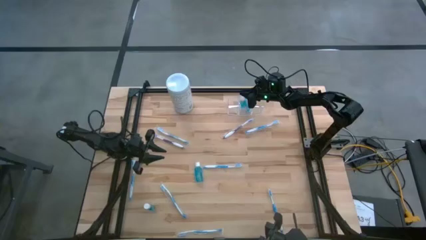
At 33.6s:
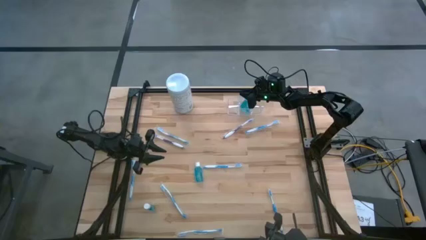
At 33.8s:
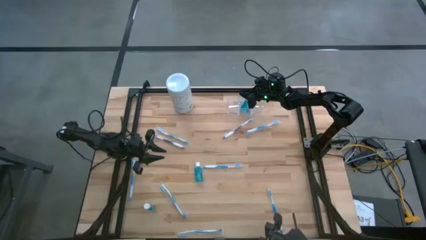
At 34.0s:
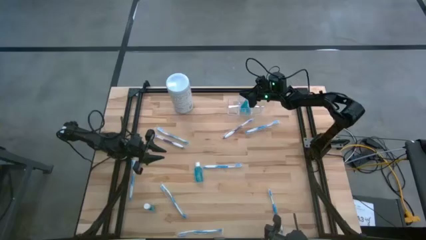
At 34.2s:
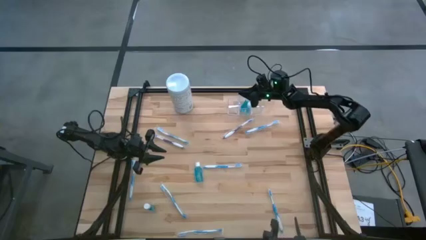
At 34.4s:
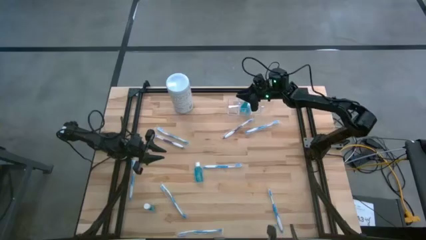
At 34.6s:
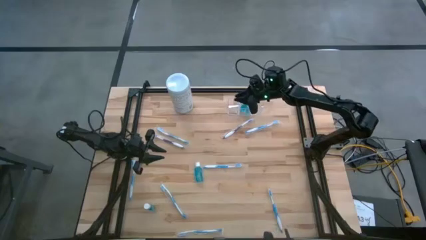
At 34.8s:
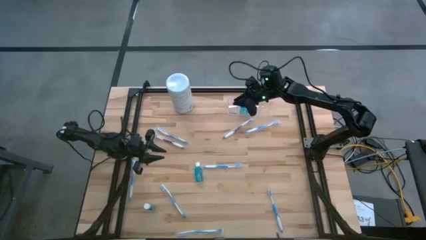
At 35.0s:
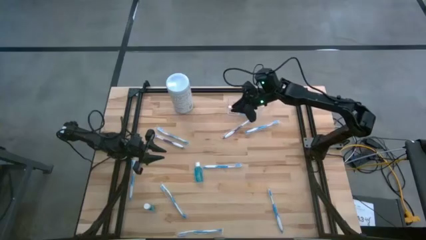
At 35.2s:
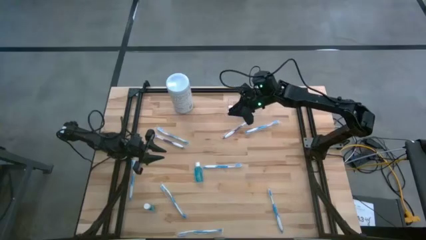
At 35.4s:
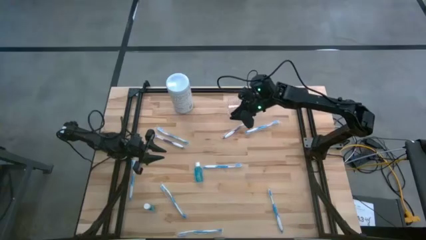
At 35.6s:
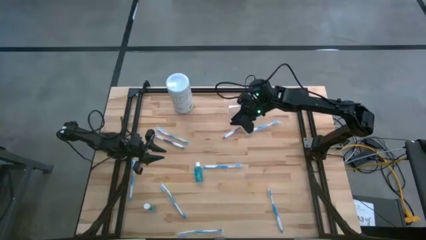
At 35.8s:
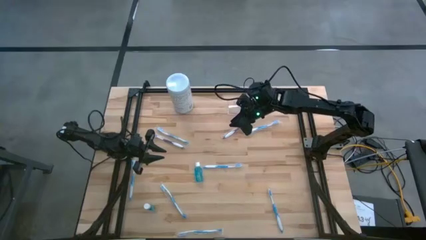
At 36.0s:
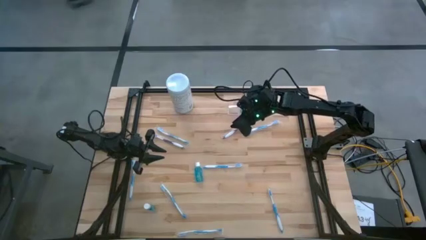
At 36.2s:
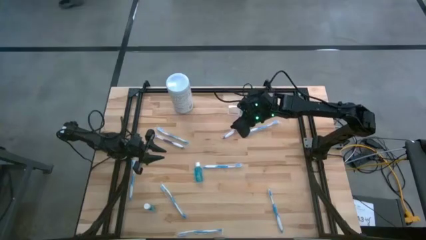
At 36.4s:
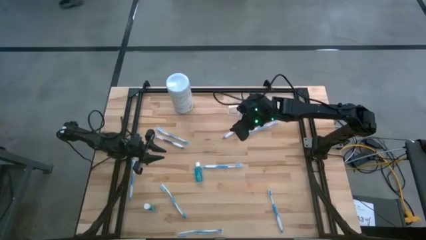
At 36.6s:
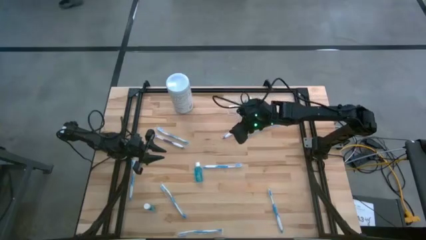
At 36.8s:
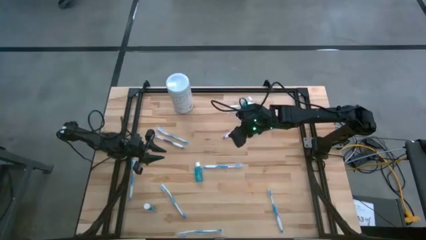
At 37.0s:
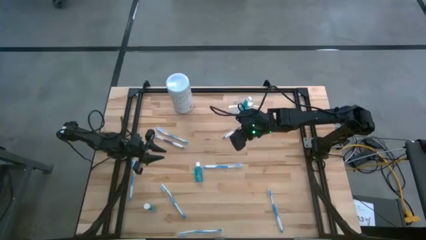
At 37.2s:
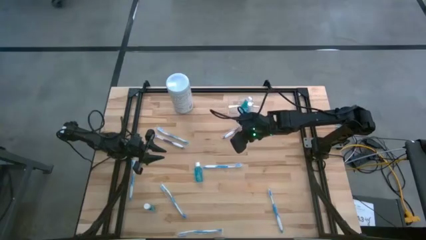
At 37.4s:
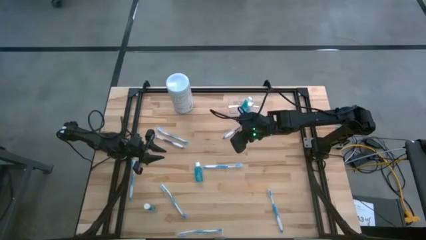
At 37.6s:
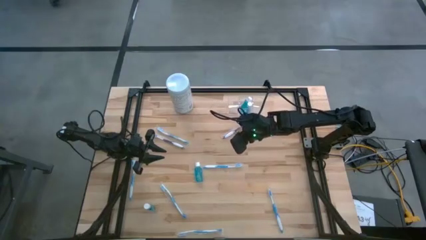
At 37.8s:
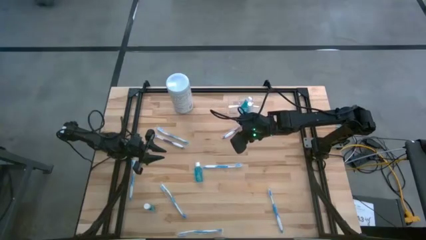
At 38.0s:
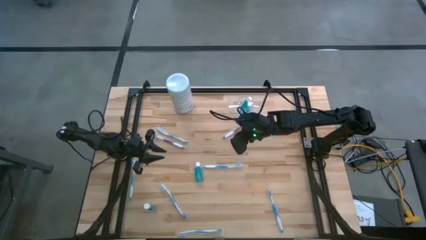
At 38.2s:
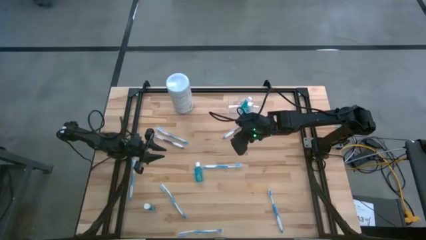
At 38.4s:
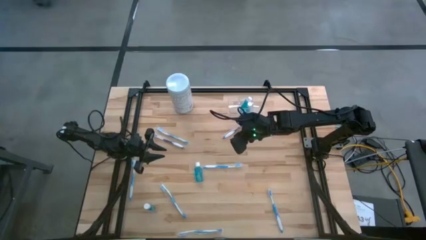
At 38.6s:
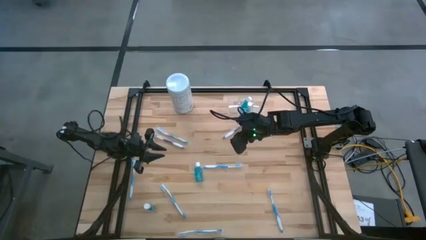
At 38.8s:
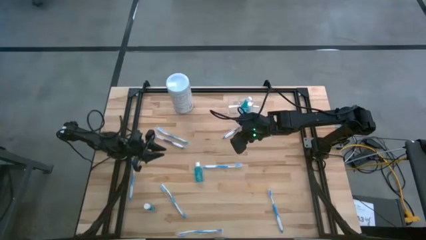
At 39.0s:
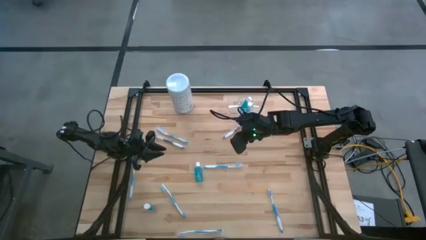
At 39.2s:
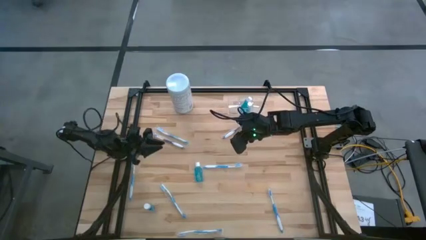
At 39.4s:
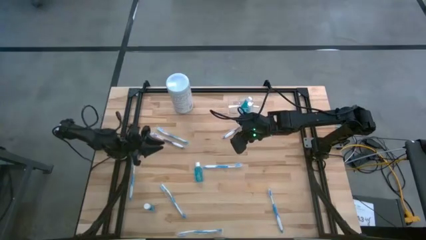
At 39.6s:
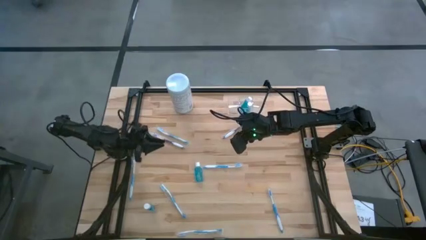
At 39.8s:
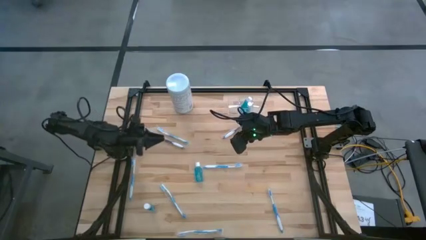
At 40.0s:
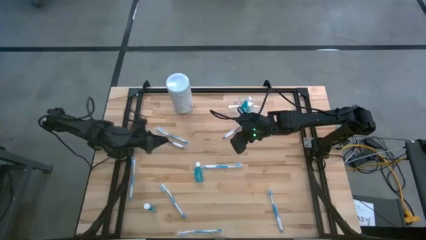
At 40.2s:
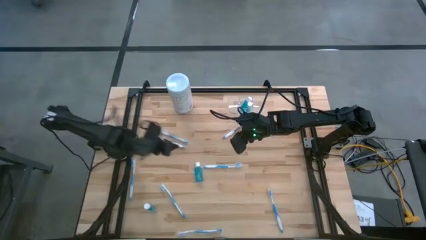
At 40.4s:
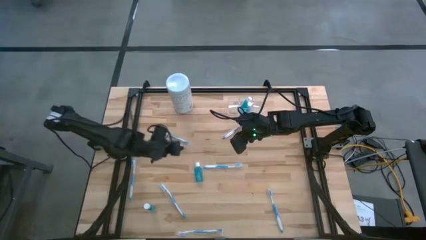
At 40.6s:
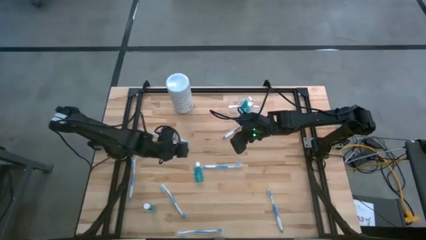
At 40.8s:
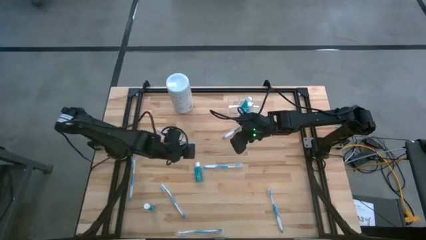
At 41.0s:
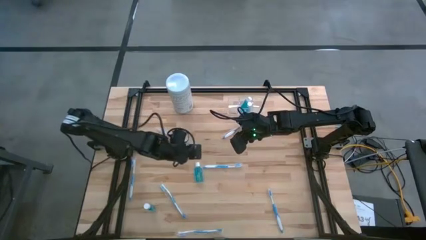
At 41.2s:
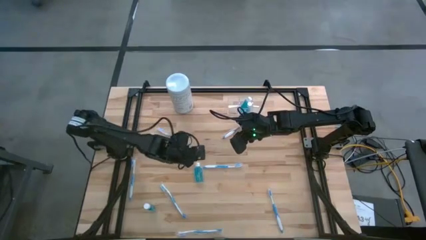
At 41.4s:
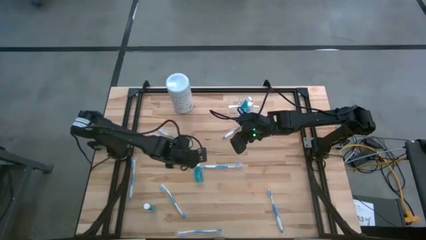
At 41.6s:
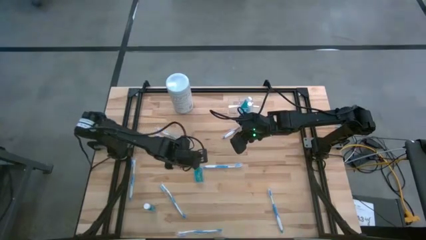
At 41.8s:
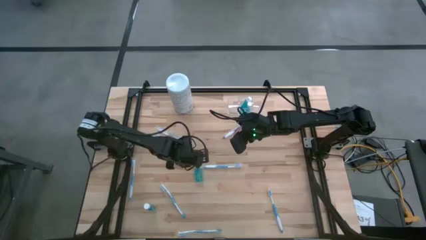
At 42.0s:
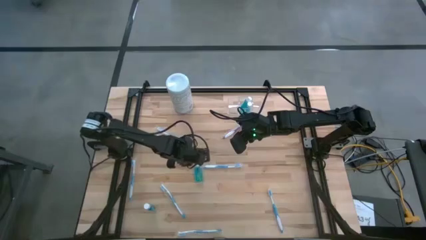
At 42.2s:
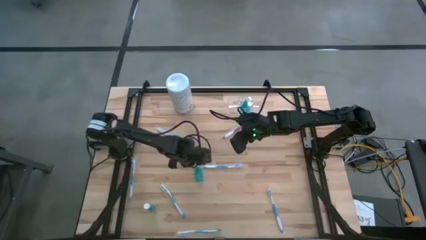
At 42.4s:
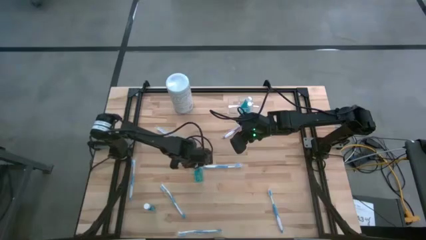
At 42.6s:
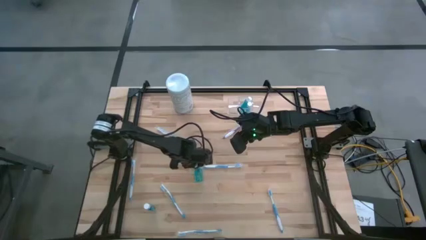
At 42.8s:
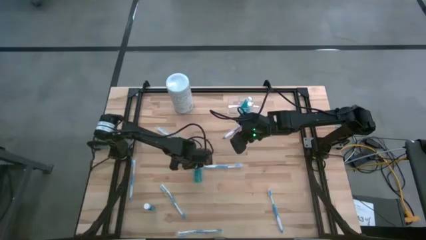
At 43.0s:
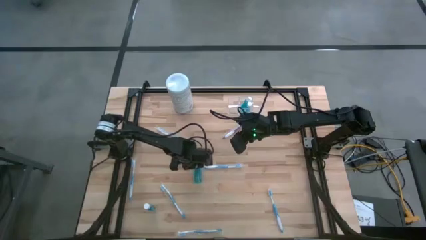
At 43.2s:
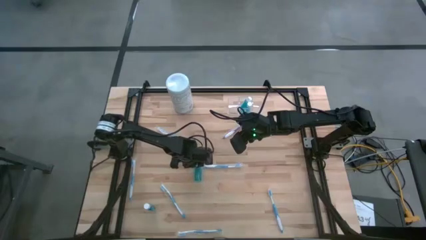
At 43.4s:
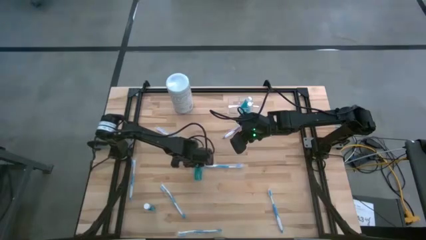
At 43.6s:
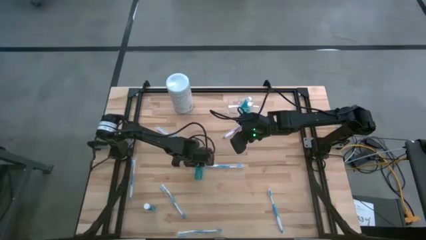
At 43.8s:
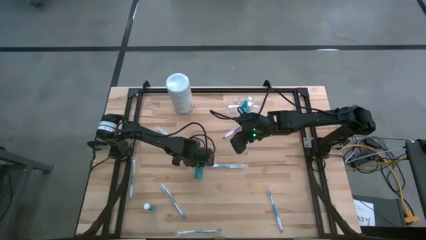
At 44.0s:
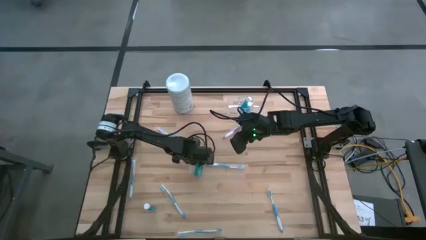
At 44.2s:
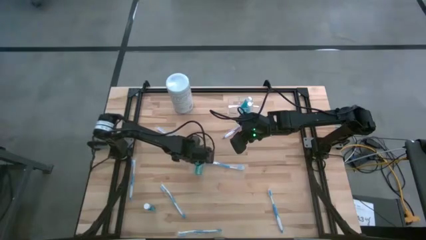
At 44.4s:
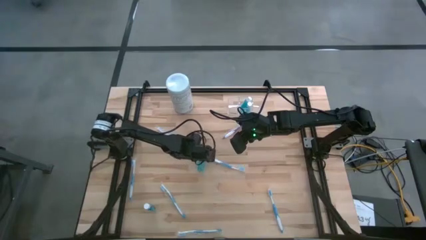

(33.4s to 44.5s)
Task: Pick & Place toothbrushing station
Put the blue mouthwash into the middle of the transparent organizer

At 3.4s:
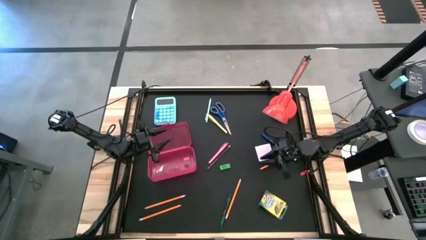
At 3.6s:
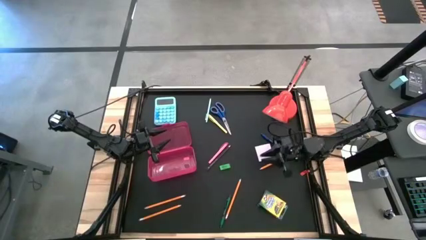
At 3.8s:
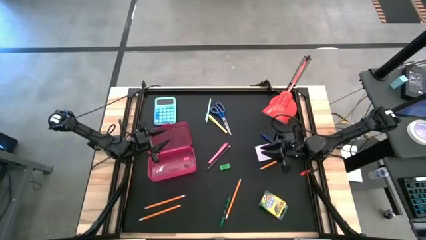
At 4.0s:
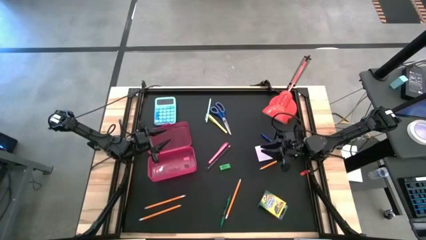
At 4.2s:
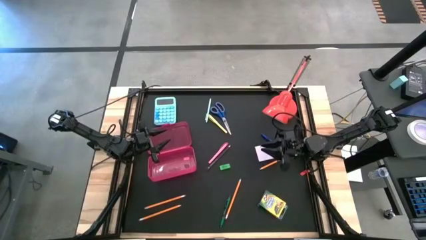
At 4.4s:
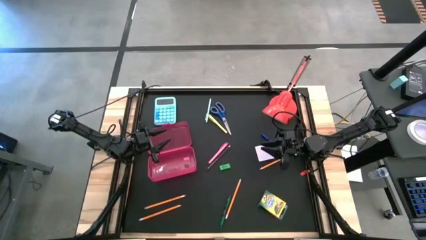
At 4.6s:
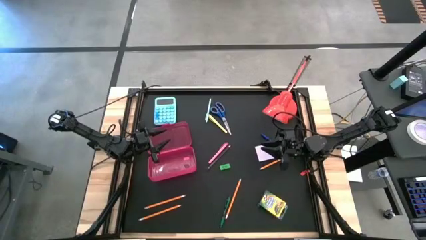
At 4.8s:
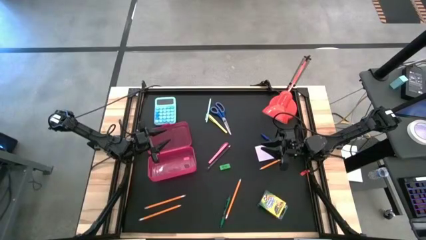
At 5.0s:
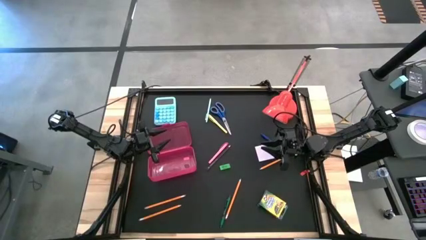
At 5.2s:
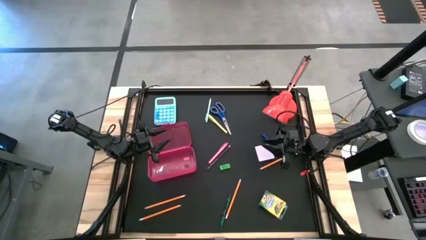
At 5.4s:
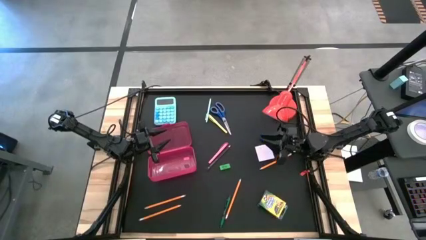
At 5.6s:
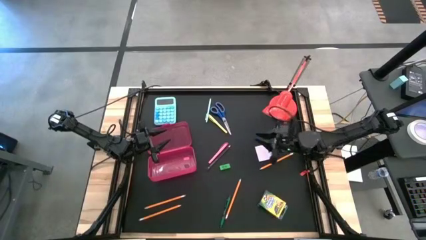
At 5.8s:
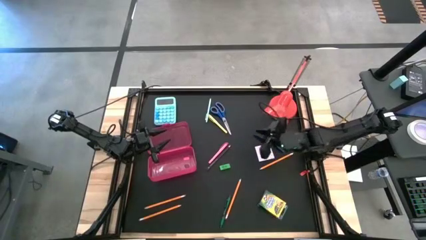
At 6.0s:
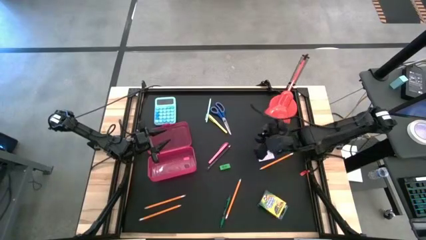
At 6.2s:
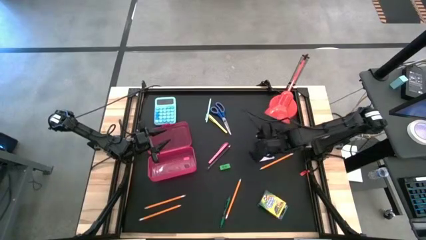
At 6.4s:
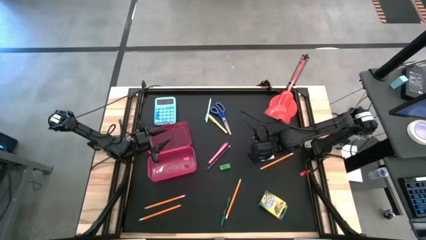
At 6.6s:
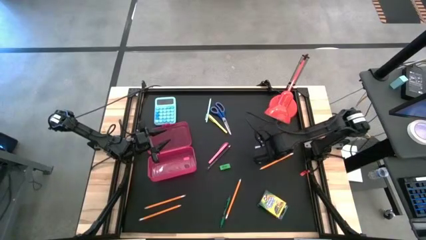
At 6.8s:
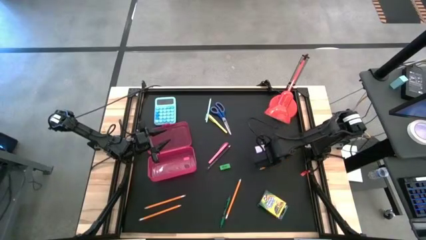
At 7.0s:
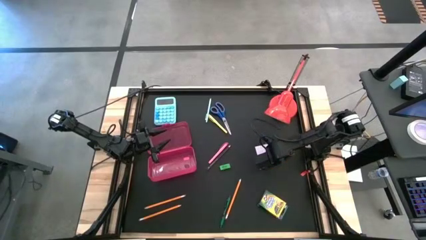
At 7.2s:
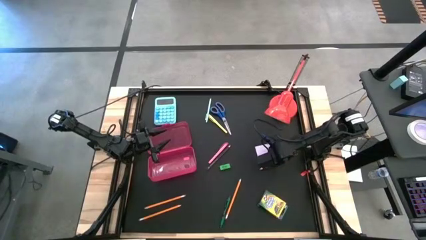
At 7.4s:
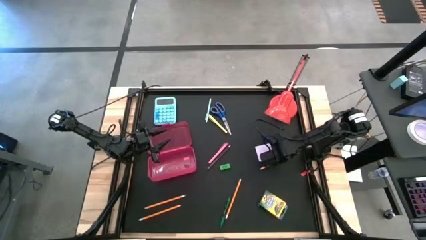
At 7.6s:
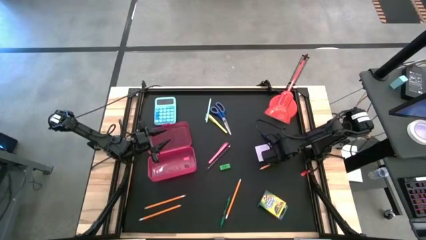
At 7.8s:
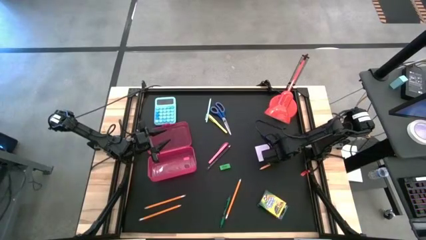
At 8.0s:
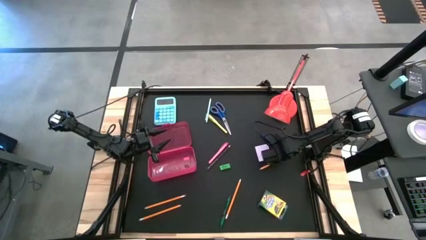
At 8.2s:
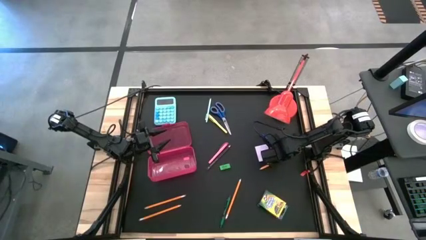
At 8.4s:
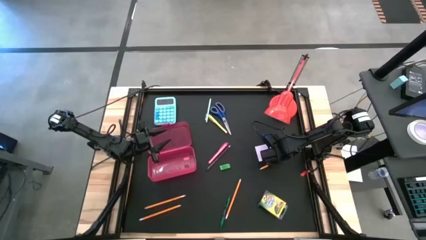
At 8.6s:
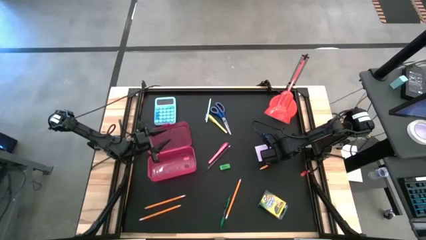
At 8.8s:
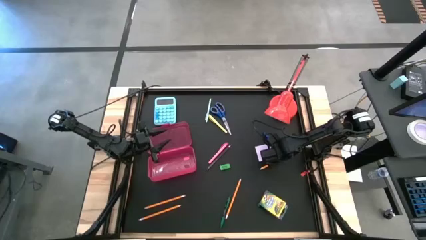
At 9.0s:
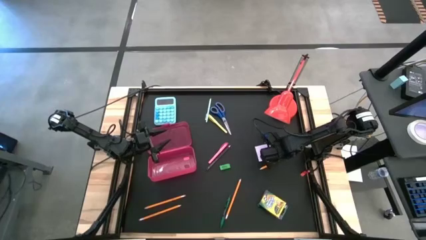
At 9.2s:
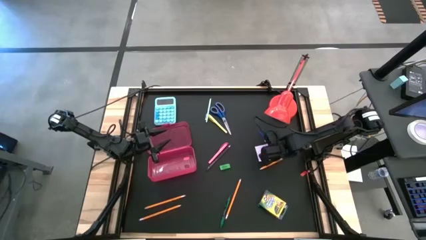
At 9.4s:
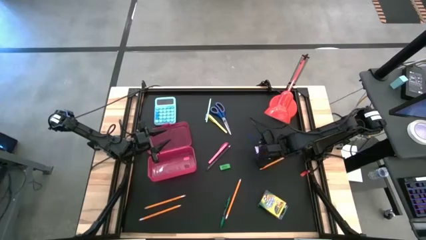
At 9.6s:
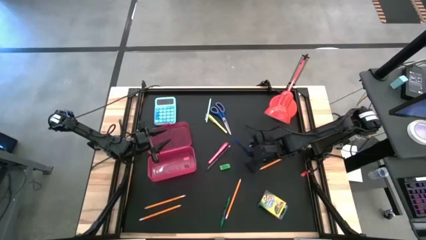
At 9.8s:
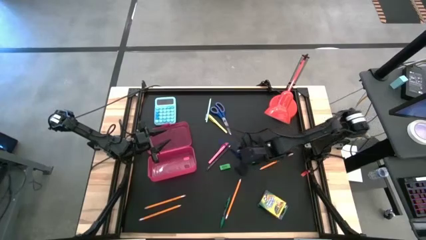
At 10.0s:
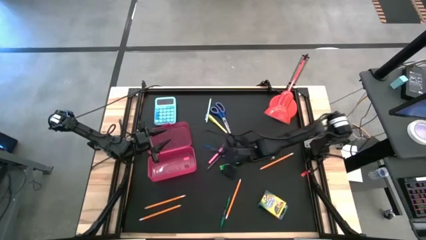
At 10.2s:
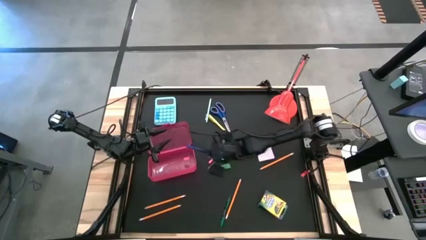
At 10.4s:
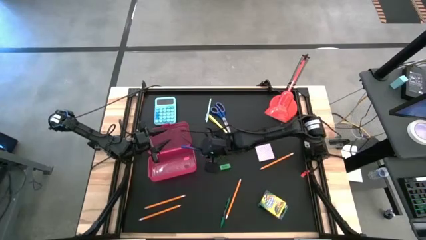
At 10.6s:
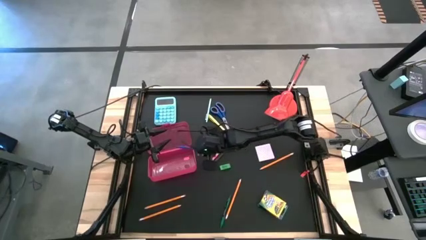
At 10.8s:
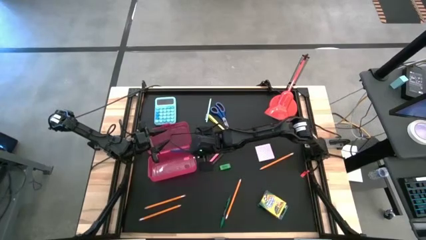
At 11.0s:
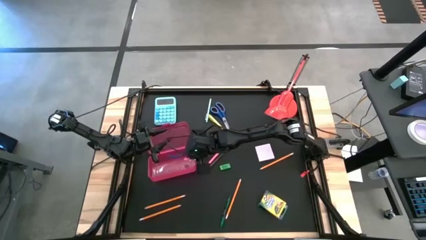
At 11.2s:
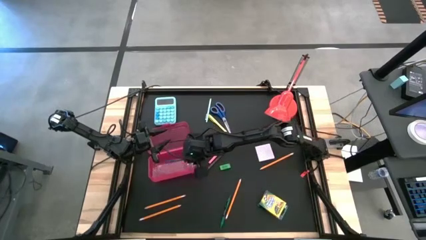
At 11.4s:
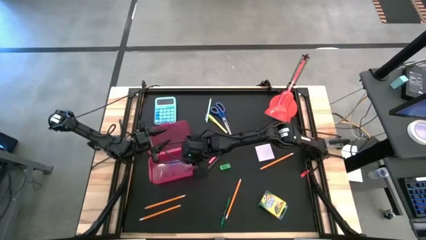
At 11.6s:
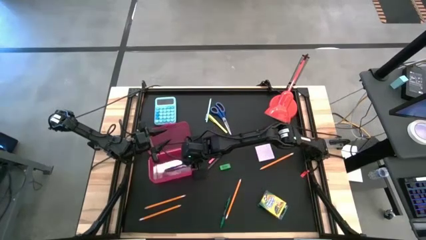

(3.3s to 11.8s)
Task: Pack school essentials
Put the blue pen into the pink supply box
